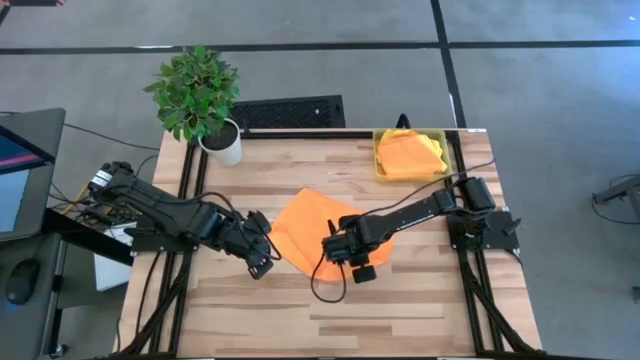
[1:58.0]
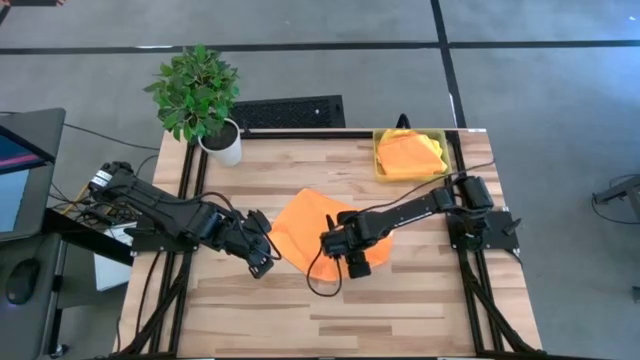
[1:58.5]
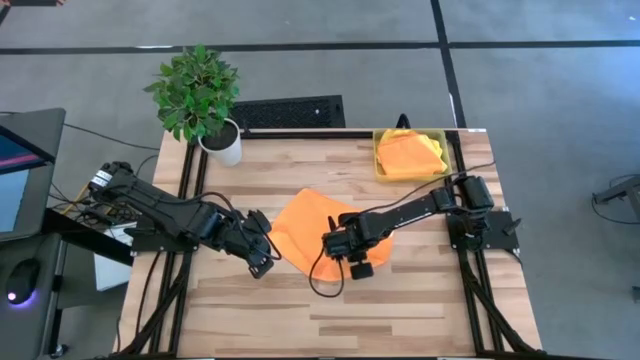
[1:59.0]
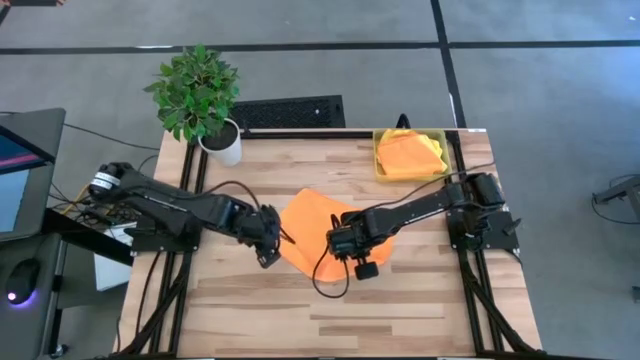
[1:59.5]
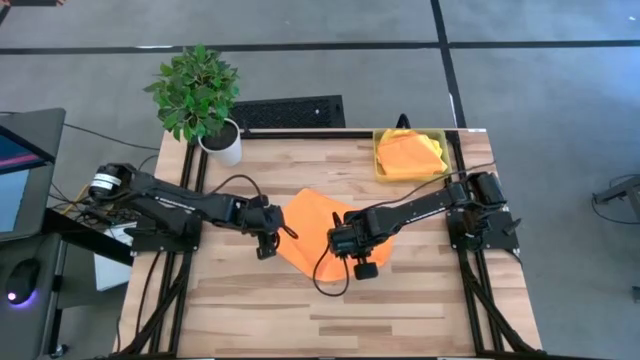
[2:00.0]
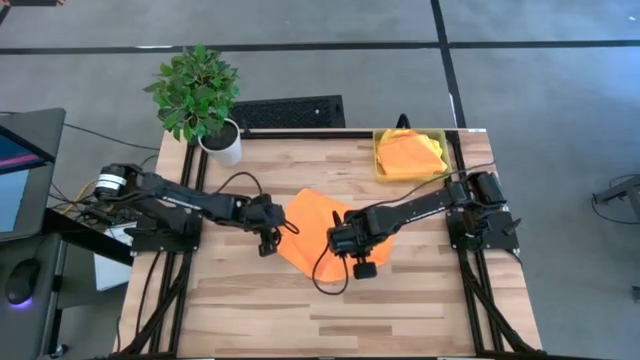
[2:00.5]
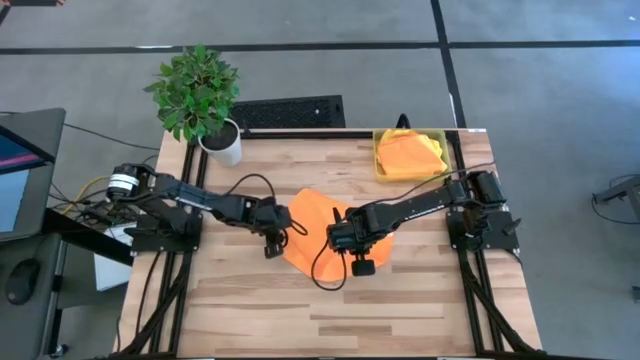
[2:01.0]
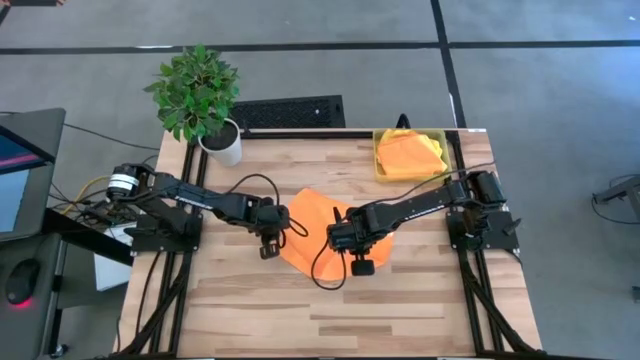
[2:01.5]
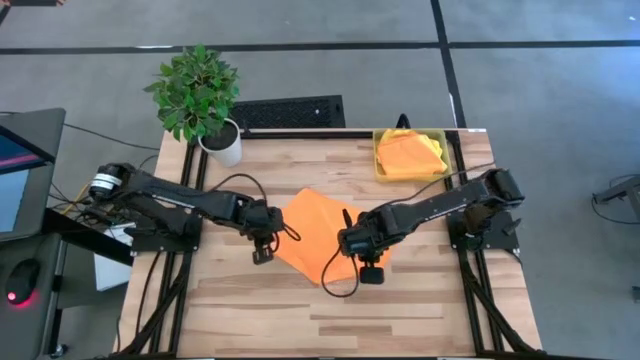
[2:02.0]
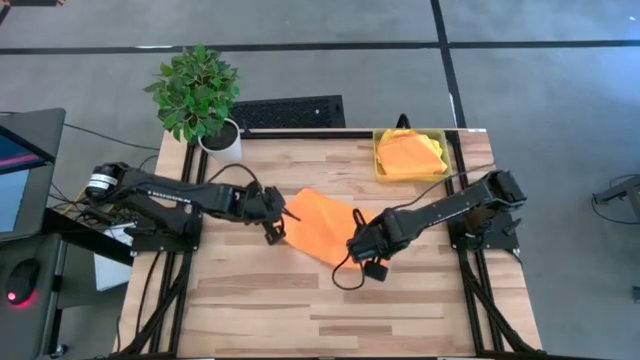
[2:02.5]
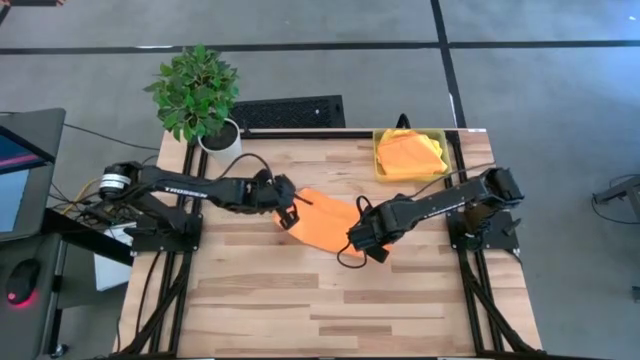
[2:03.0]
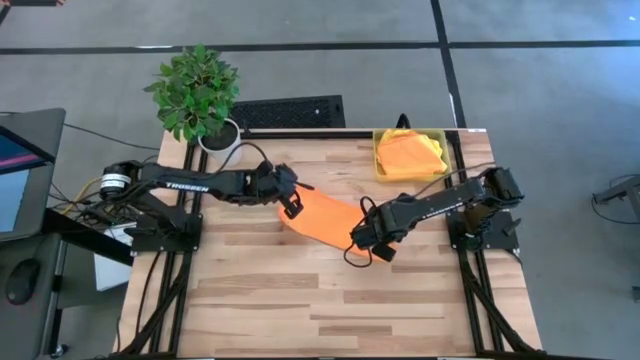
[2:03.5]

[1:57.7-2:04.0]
Task: Fold microfiber towels
Fold the orange microfiber towel

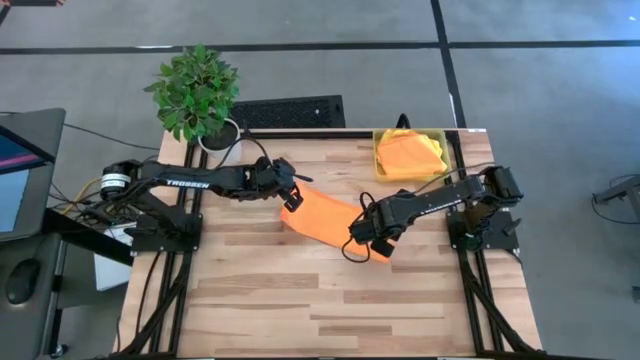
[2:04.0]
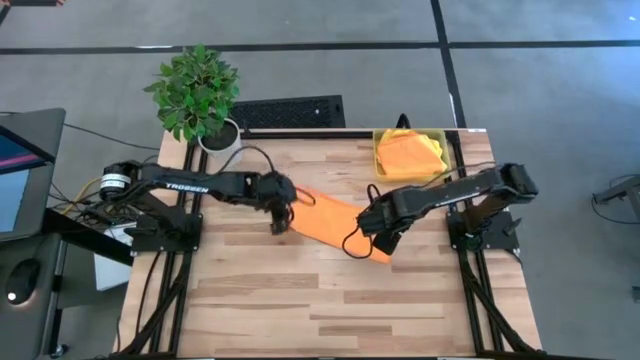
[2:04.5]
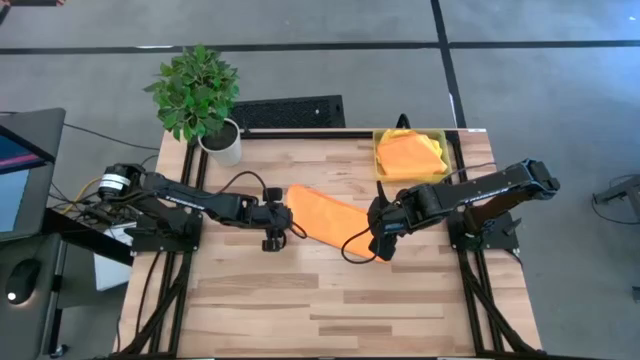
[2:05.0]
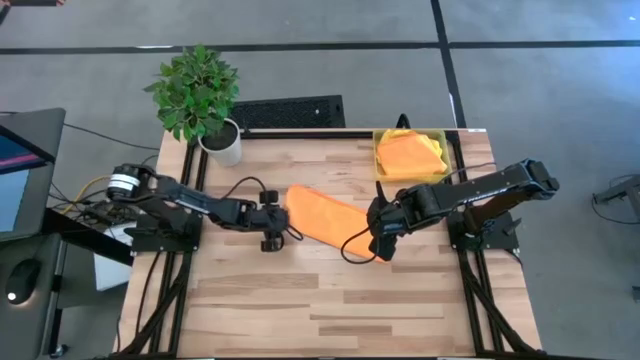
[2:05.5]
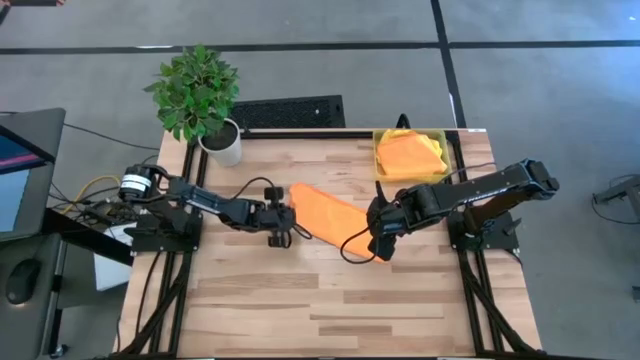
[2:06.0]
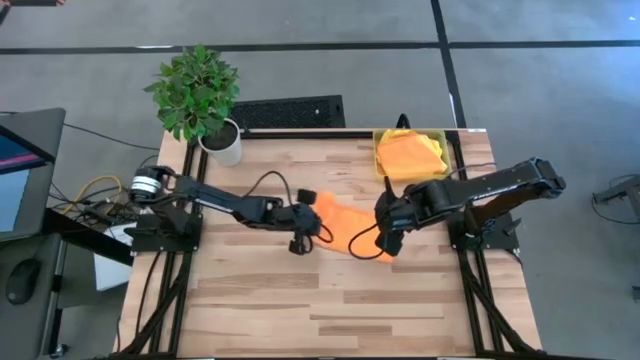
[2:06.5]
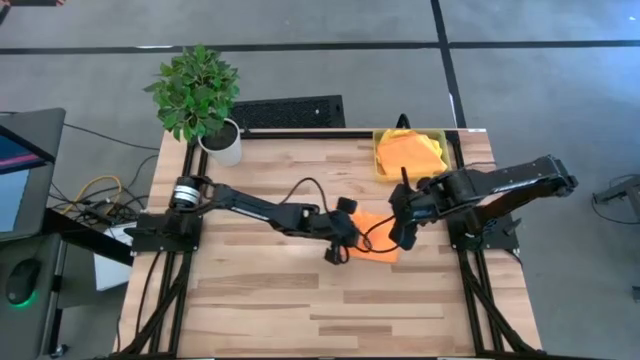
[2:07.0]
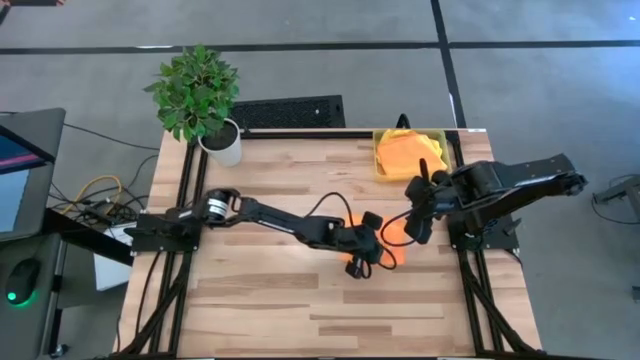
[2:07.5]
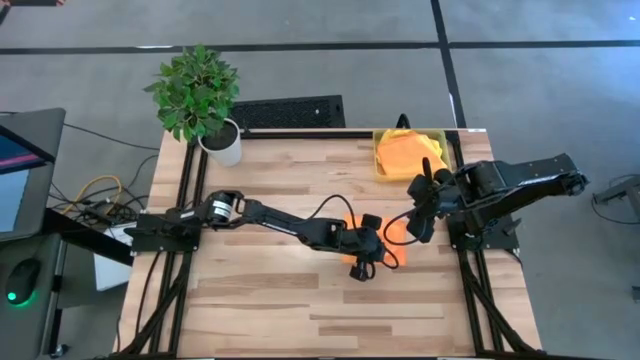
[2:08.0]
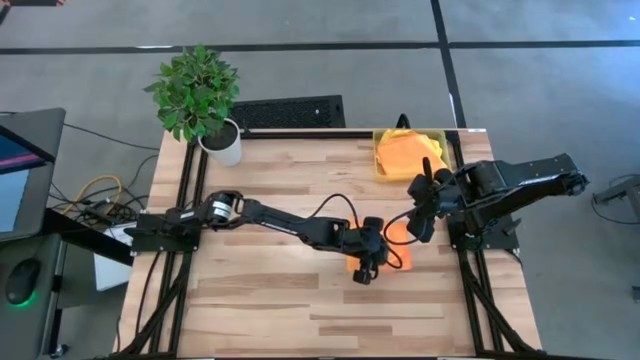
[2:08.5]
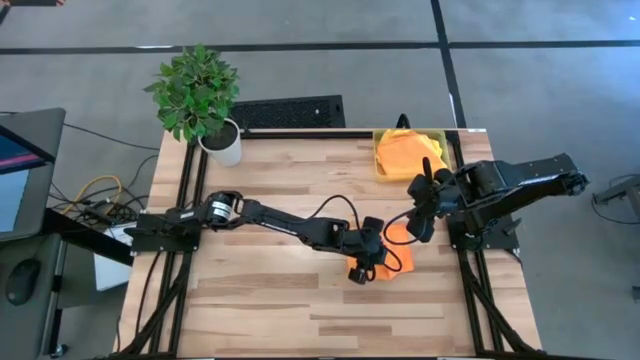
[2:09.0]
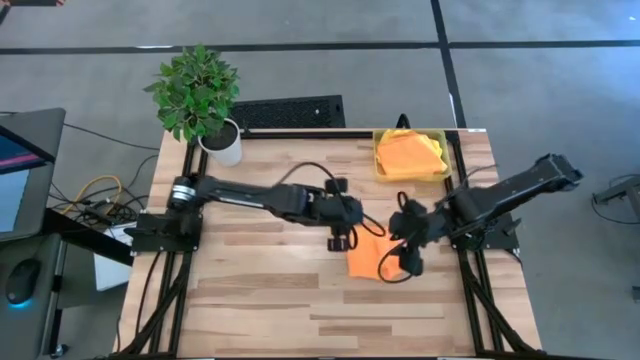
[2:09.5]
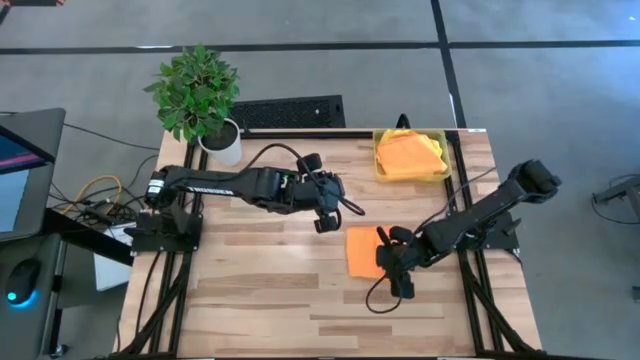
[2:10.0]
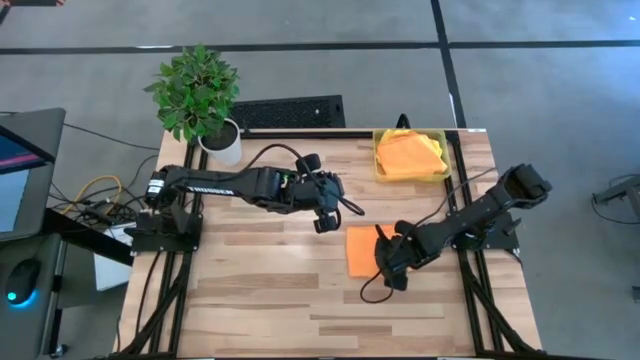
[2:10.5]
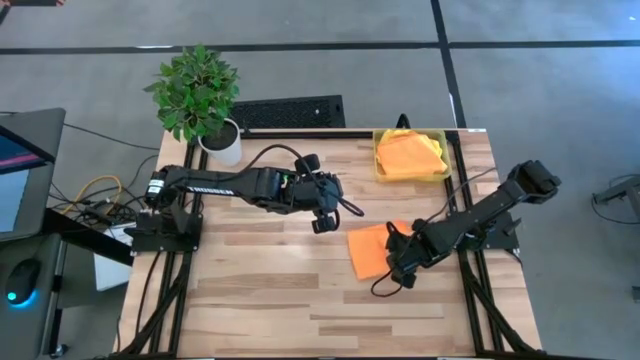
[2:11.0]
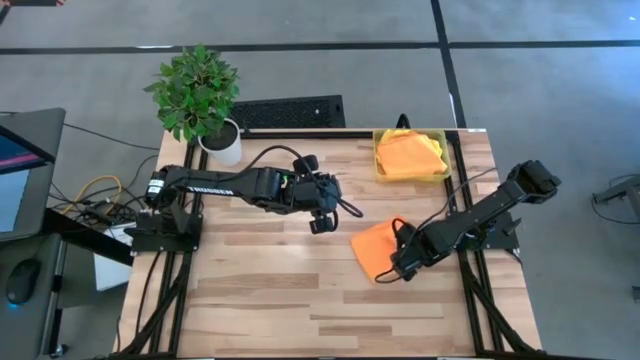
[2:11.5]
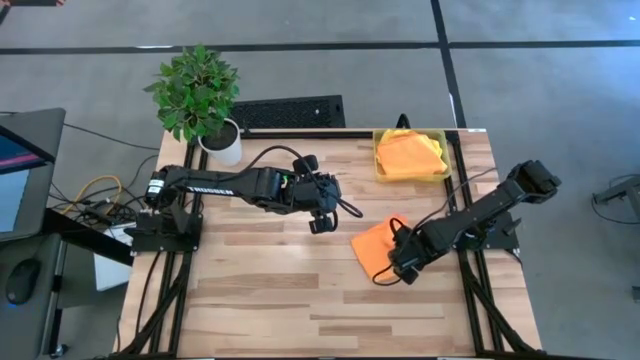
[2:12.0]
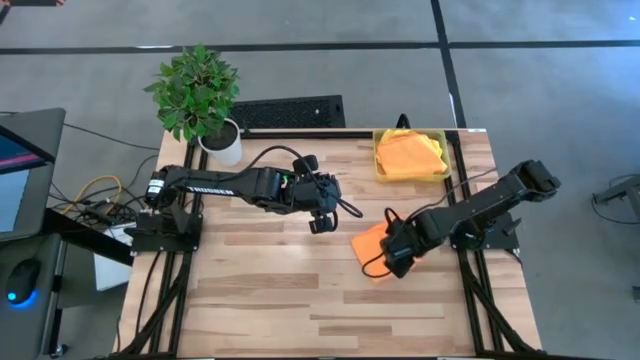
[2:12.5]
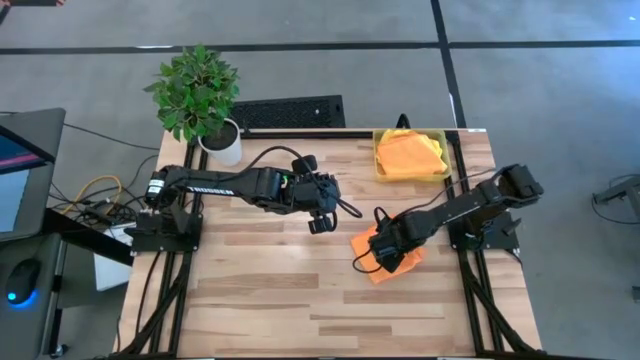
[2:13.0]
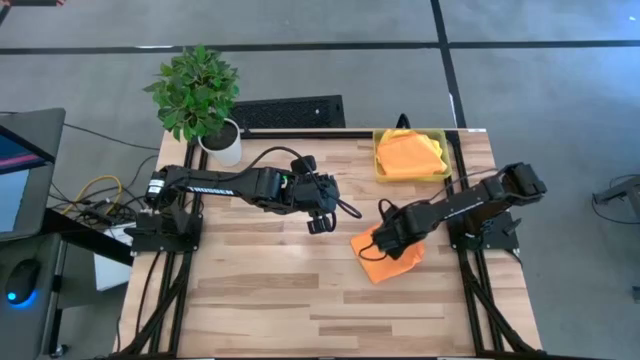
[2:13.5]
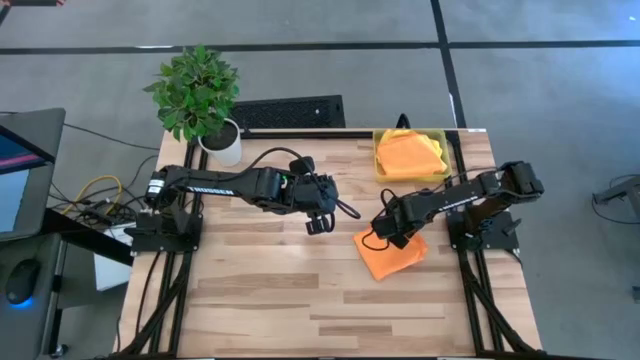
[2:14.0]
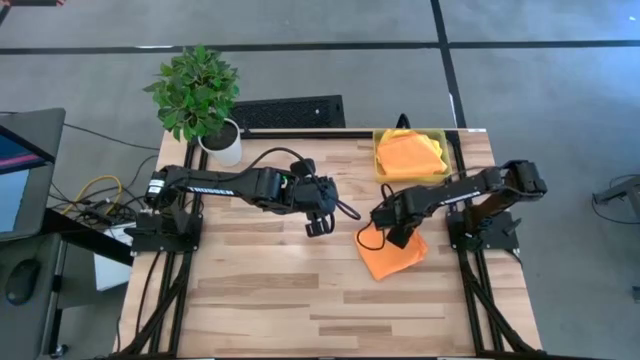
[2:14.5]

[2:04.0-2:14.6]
Fold the orange microfiber towel

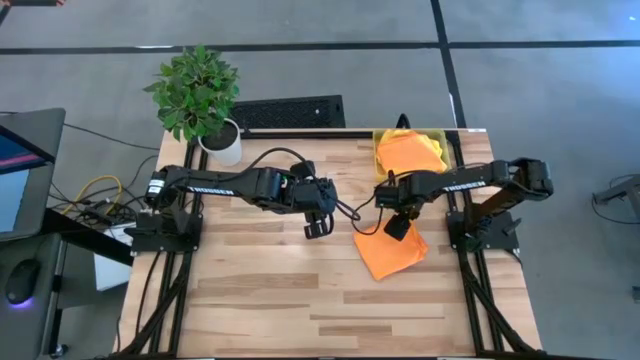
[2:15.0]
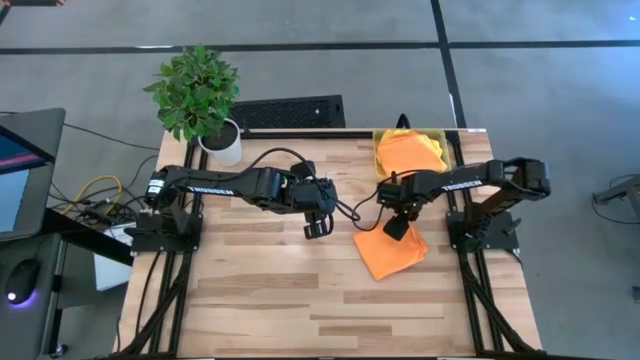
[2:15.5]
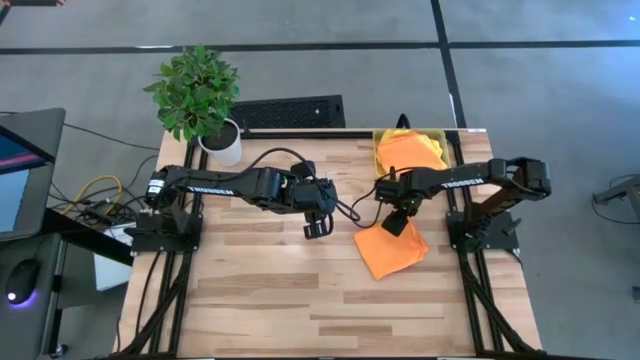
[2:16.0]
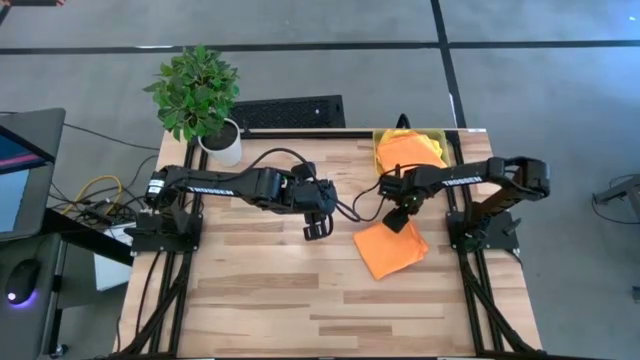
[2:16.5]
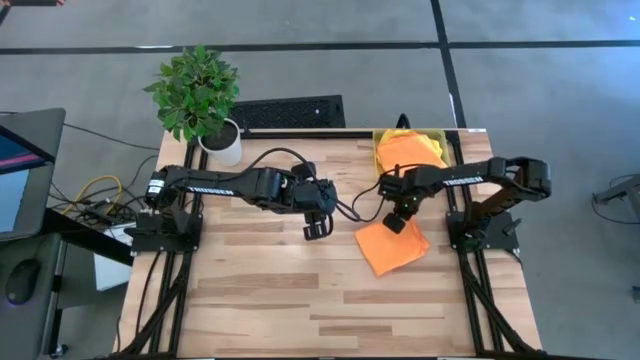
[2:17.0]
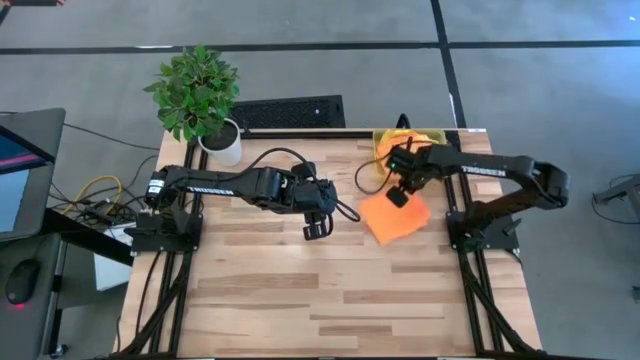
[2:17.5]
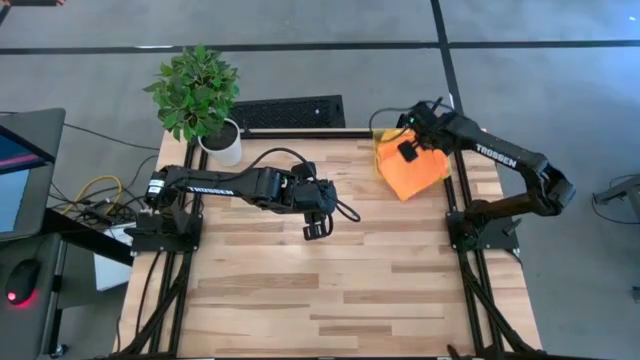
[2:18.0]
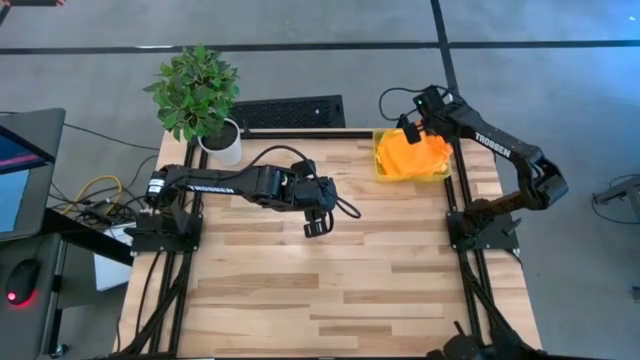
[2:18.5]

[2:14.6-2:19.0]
Put the folded orange microfiber towel into the yellow bin
